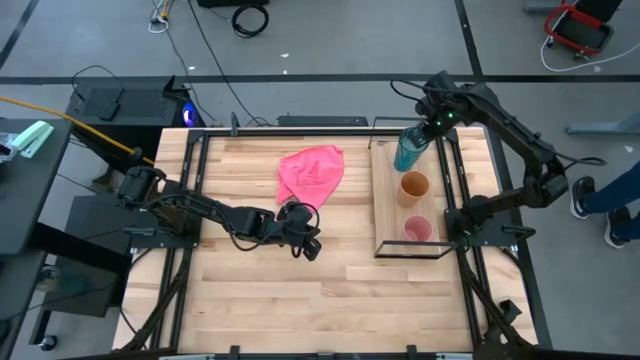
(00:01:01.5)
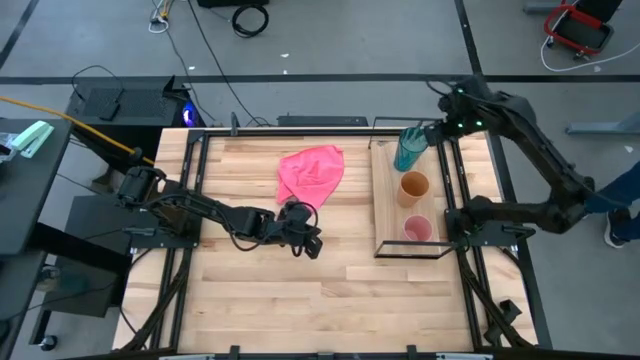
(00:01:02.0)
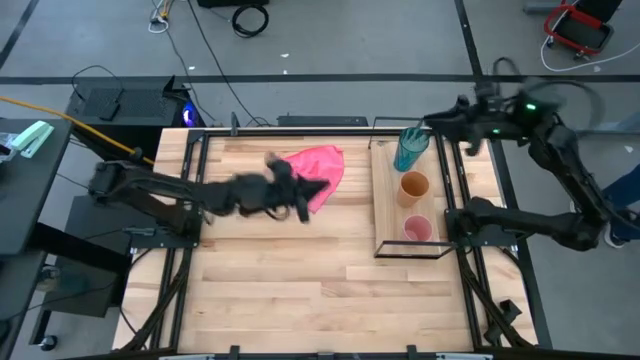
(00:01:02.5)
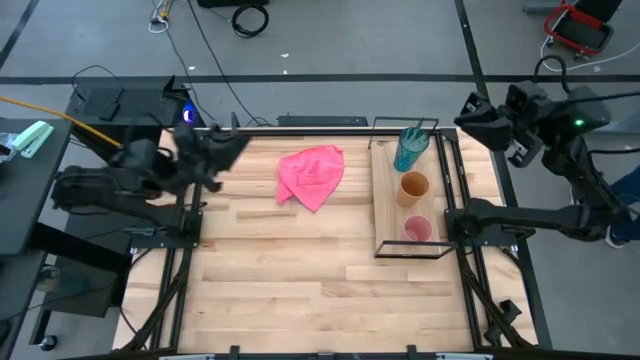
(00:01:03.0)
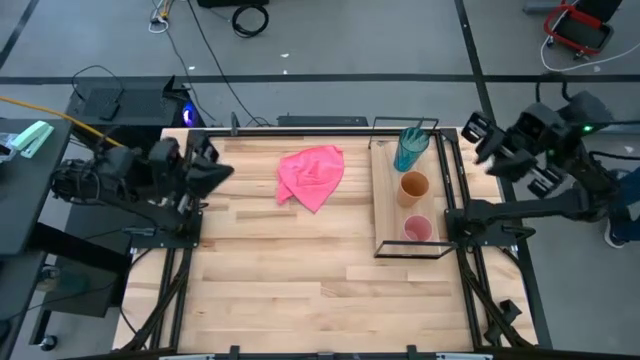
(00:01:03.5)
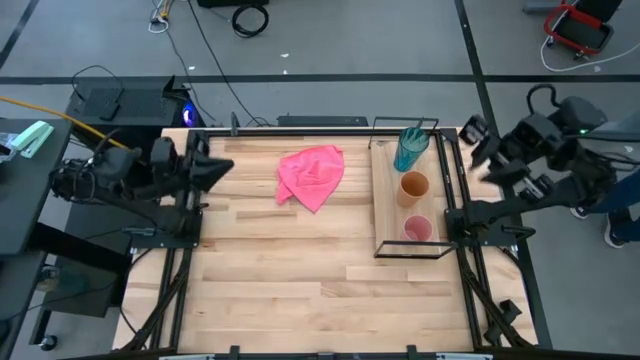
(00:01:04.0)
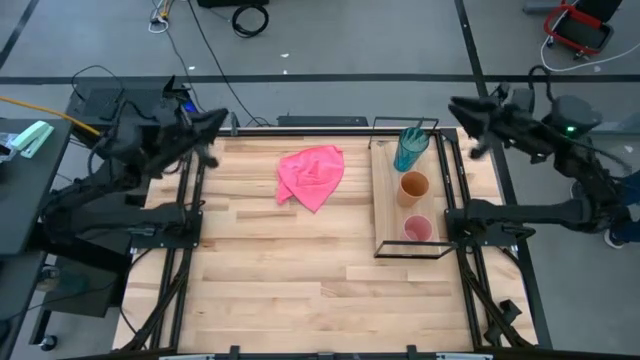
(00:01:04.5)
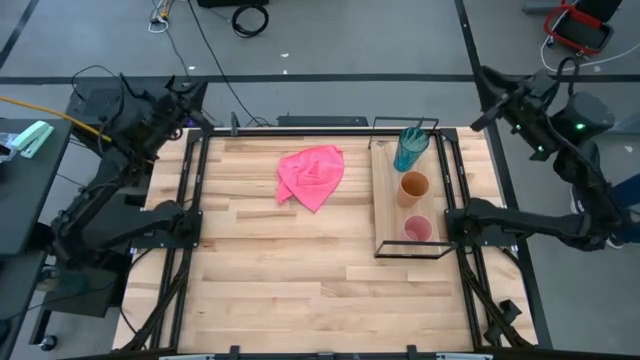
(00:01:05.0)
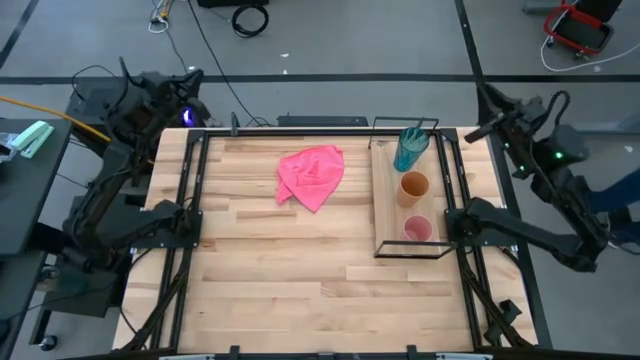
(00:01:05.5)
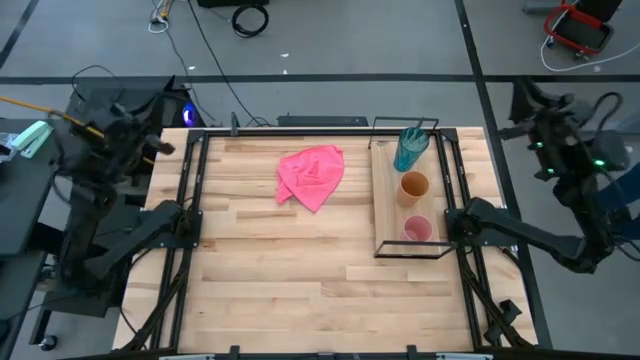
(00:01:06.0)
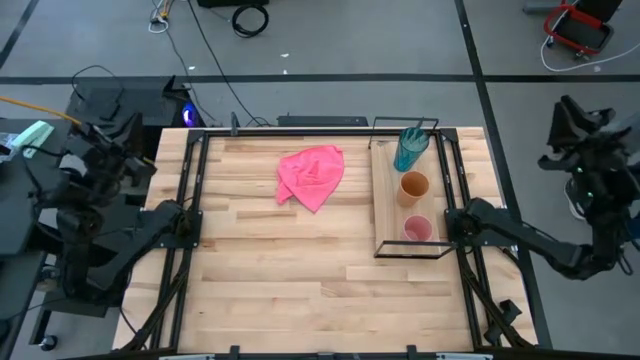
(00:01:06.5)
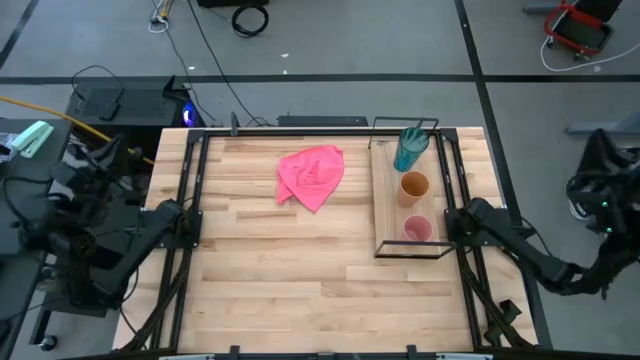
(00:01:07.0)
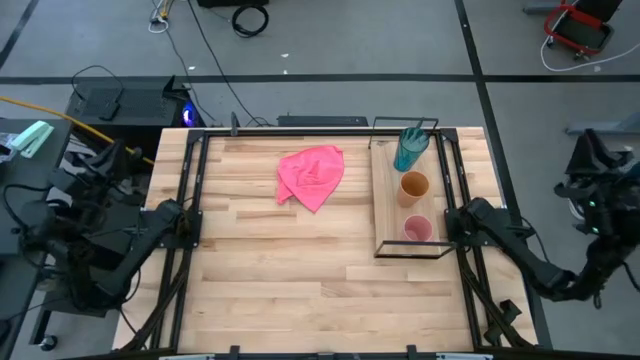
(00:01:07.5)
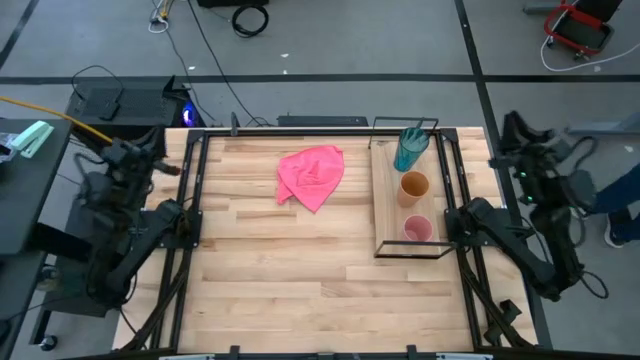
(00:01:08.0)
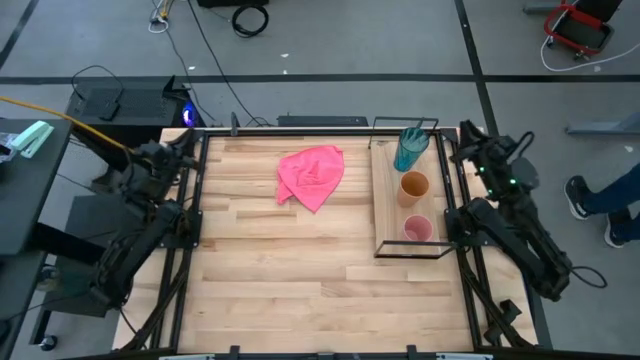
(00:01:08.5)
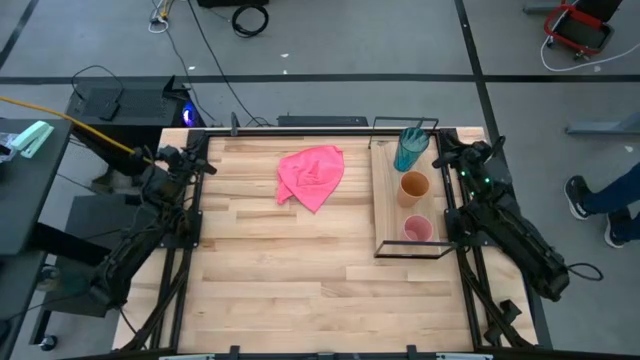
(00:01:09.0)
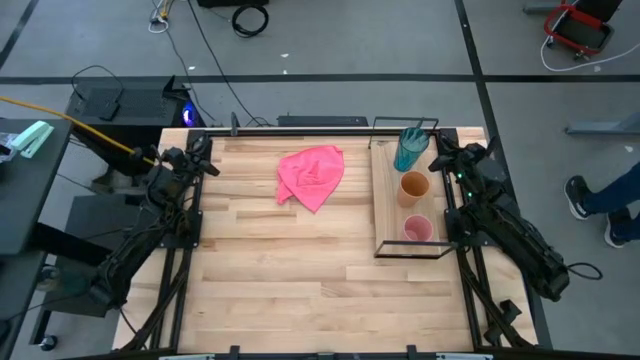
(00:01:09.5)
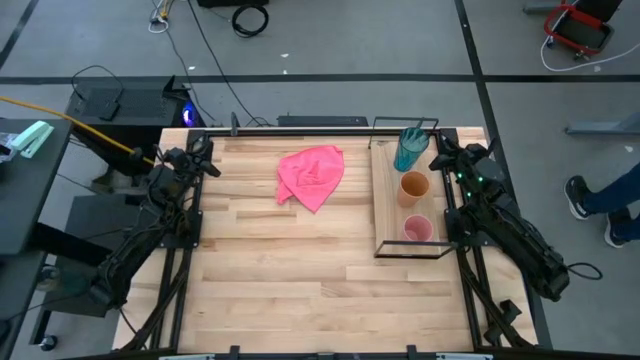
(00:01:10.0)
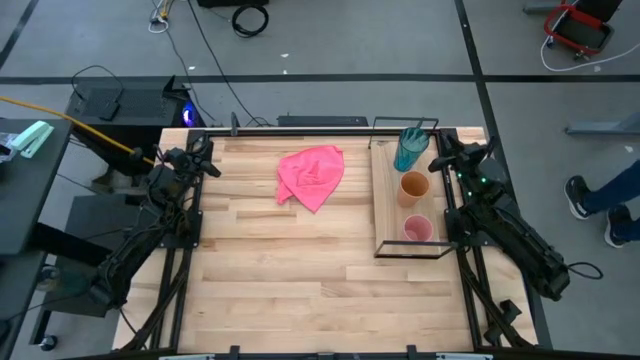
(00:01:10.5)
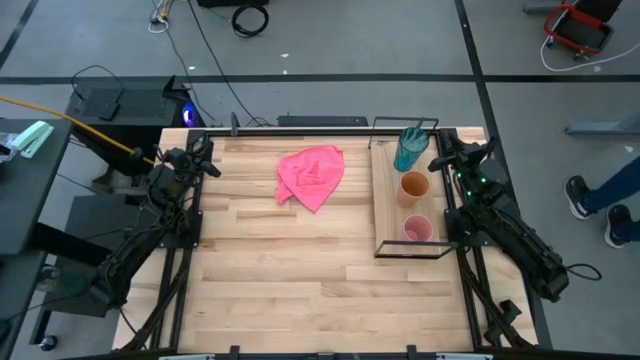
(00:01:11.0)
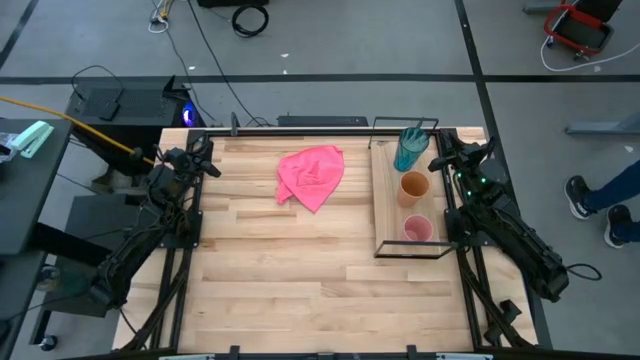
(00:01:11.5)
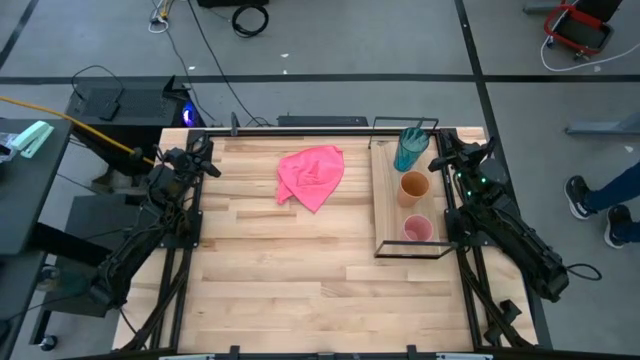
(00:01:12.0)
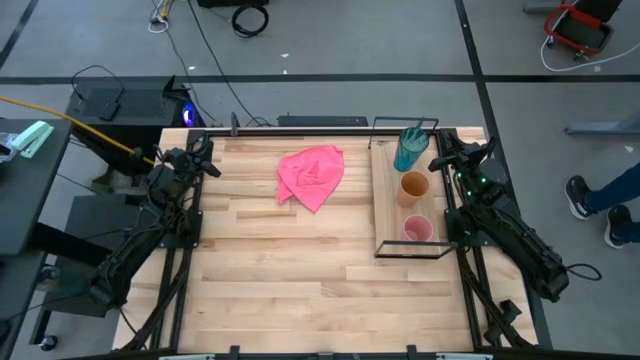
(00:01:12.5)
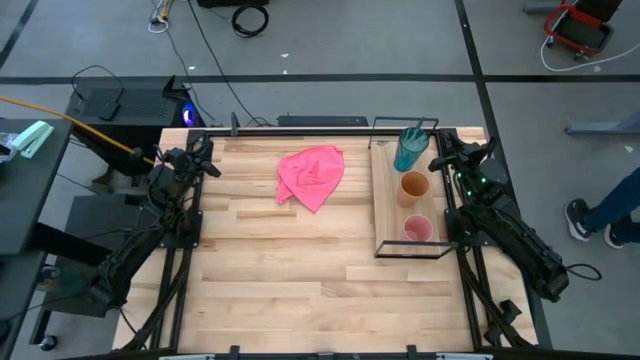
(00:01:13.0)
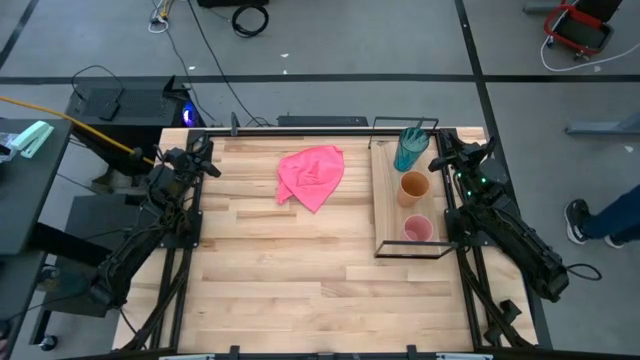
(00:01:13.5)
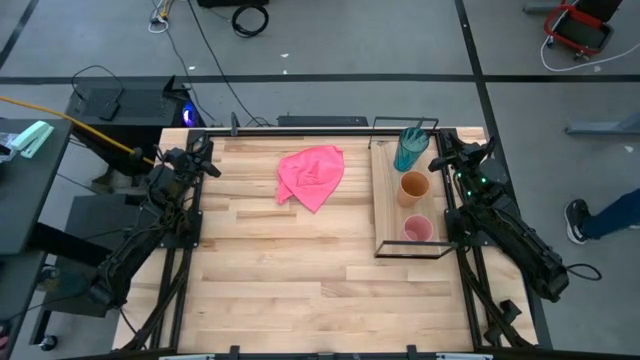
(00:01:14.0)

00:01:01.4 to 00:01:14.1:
Task: Stack small to large cups/mugs on shelf
Return to Home Position

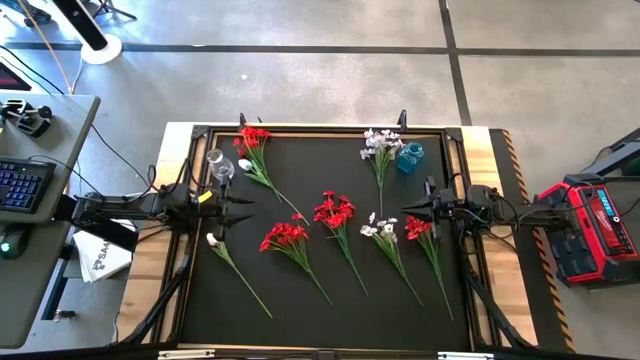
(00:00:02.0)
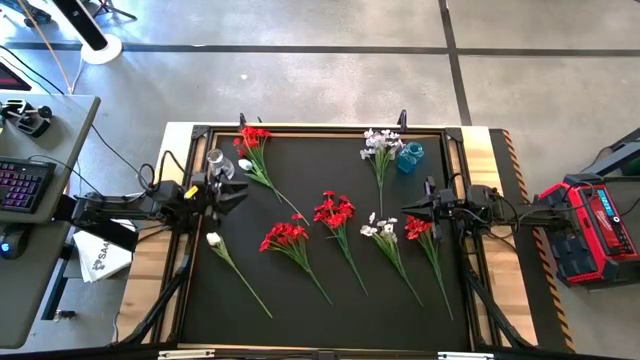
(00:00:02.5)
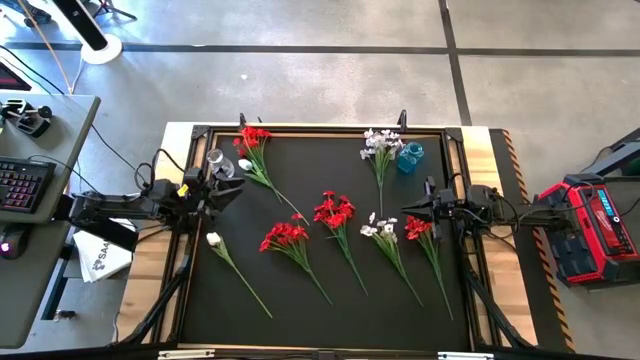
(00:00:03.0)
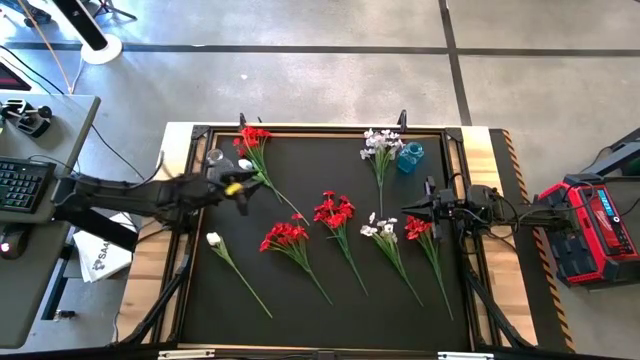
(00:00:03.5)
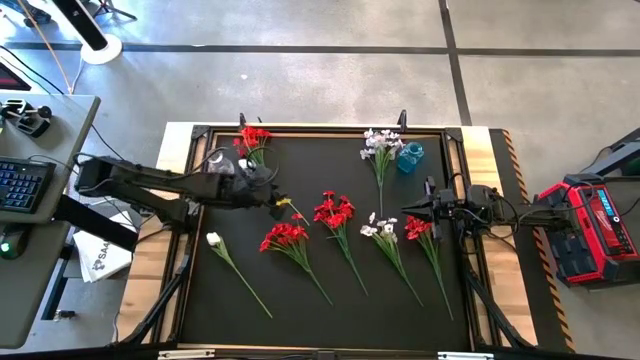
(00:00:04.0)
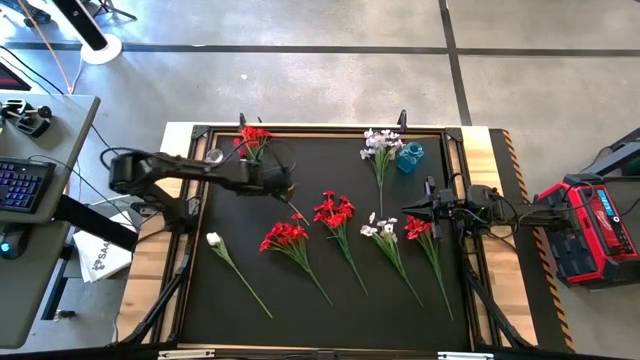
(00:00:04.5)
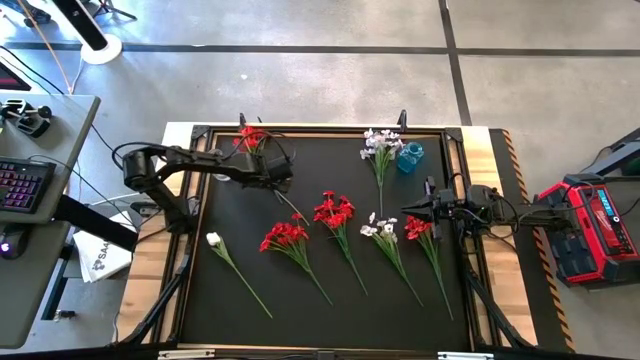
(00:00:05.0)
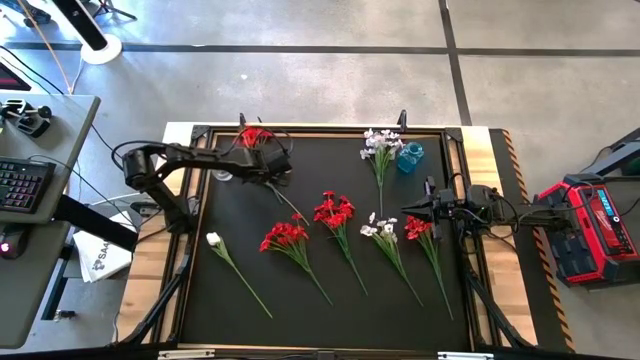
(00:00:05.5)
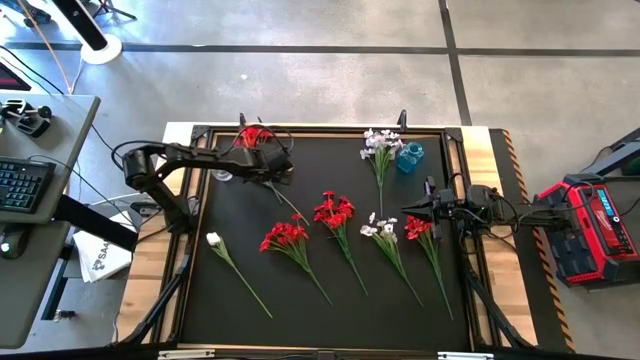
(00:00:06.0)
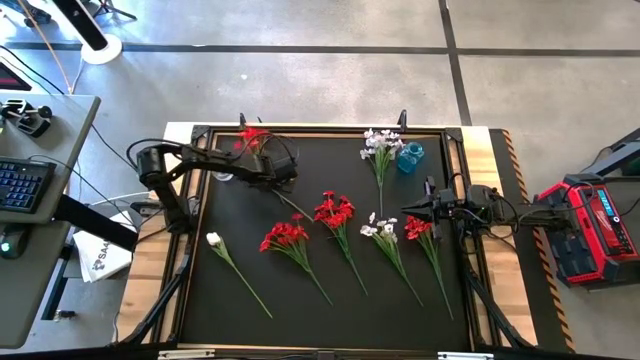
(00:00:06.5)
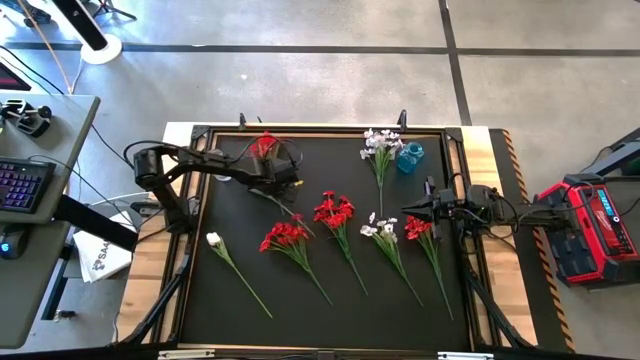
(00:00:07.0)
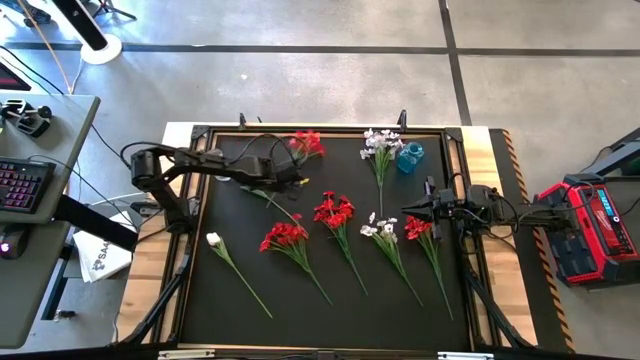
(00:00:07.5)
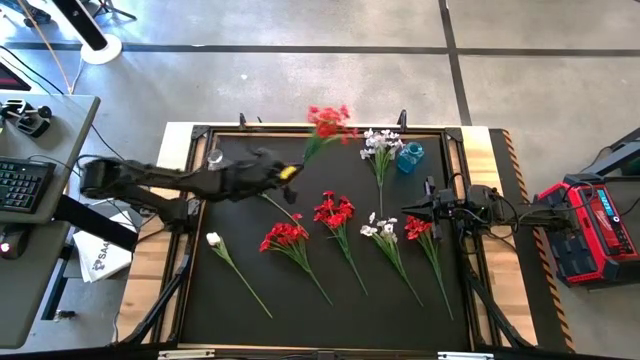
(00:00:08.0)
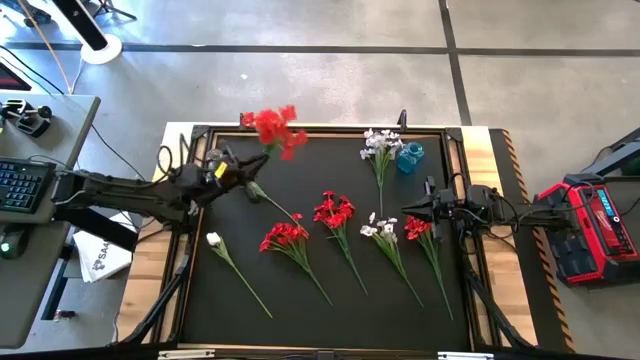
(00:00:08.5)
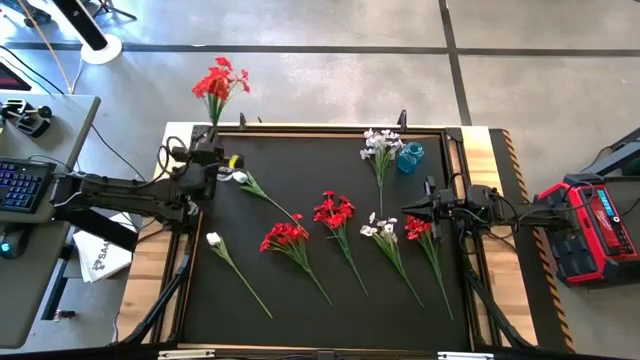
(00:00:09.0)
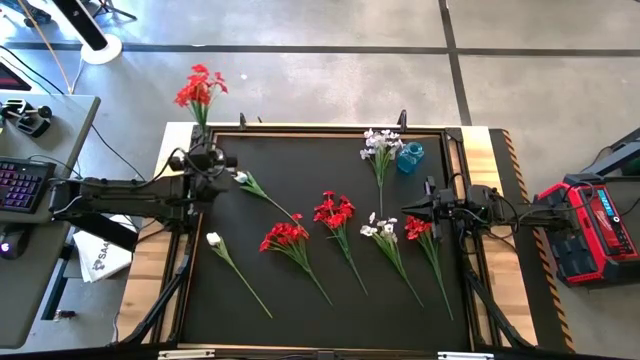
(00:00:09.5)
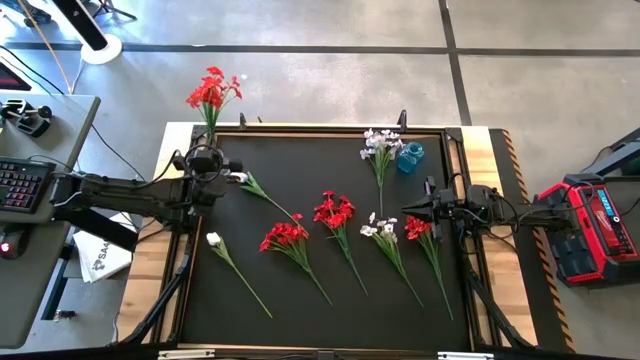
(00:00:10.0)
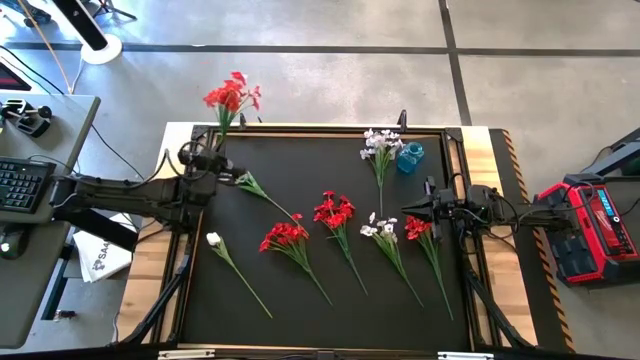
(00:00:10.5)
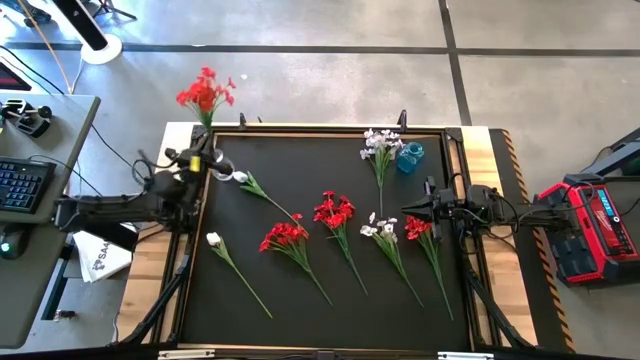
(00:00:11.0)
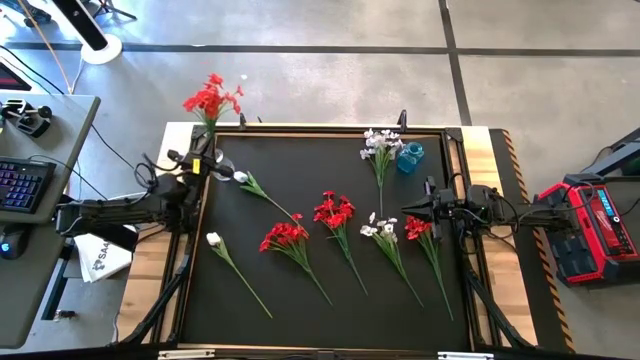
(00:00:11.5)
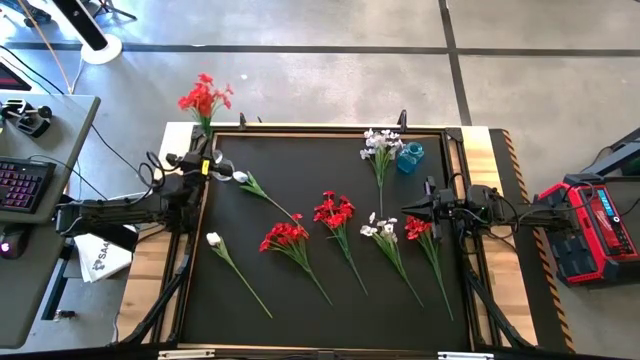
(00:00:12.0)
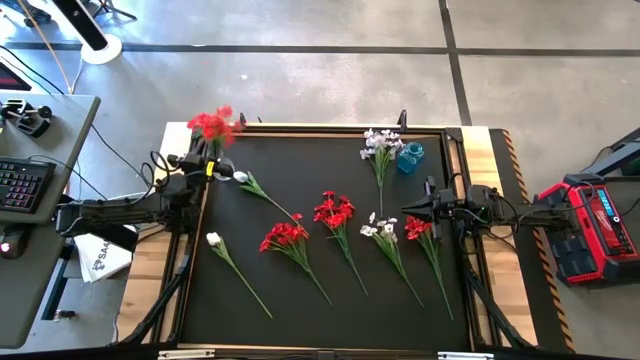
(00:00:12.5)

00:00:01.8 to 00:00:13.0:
Task: Sort flowers into vase by color
Put the top left red flowers into the transparent vase
